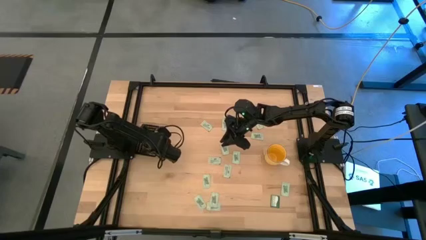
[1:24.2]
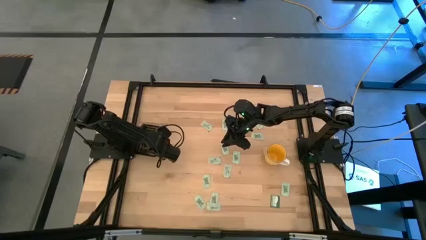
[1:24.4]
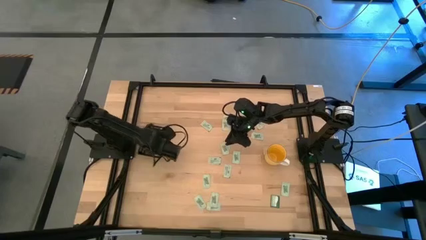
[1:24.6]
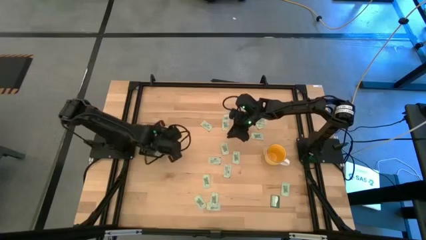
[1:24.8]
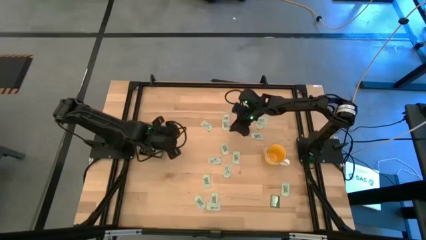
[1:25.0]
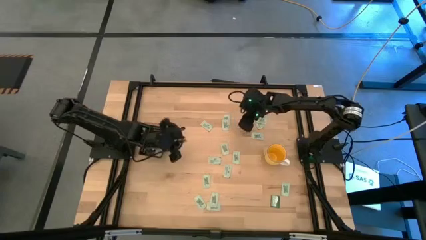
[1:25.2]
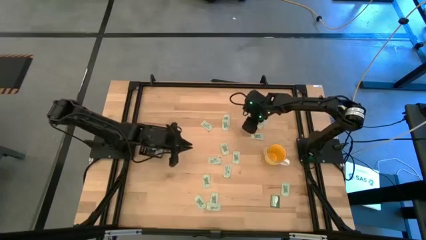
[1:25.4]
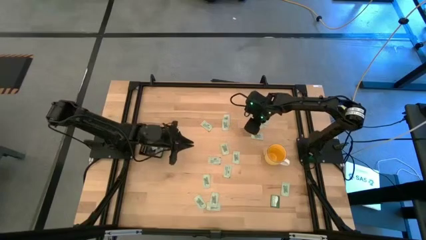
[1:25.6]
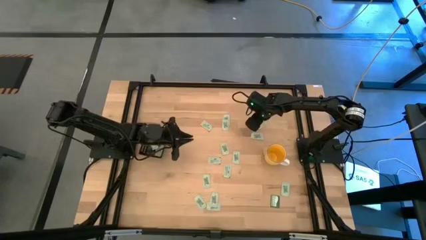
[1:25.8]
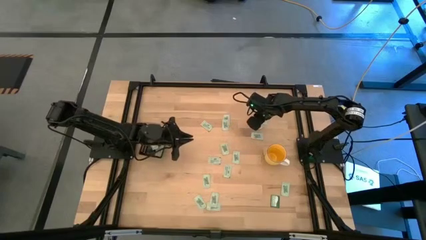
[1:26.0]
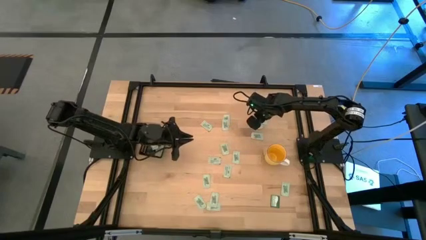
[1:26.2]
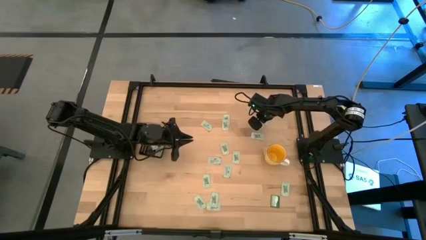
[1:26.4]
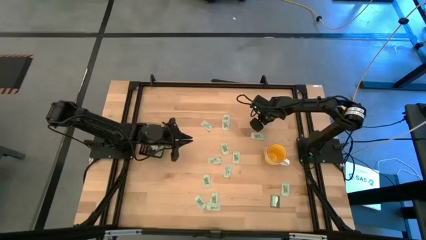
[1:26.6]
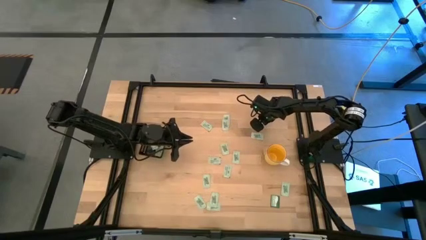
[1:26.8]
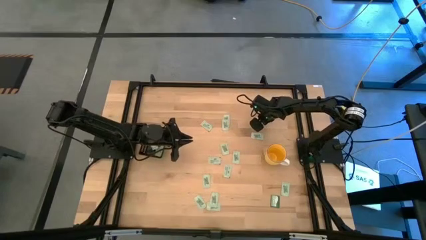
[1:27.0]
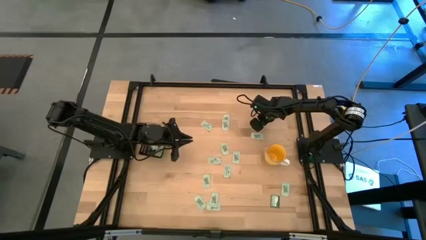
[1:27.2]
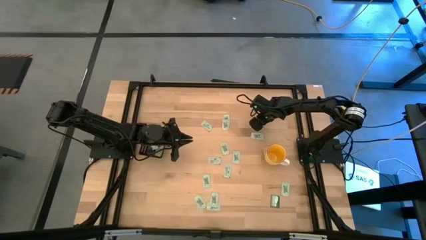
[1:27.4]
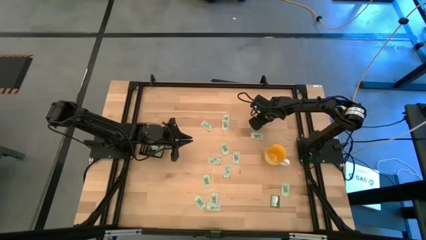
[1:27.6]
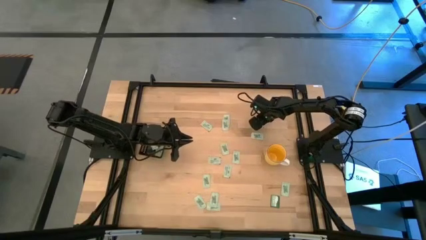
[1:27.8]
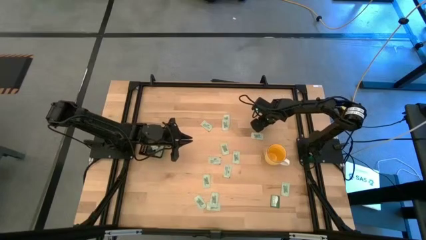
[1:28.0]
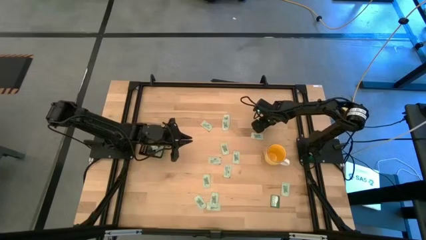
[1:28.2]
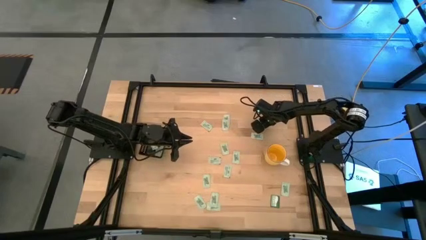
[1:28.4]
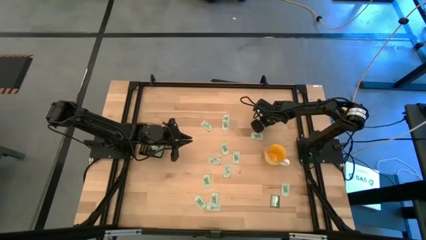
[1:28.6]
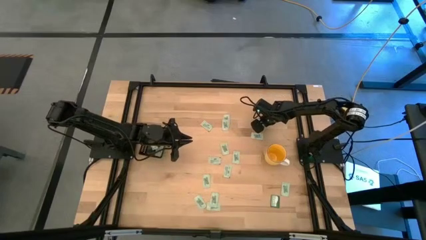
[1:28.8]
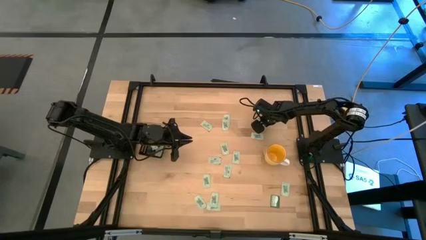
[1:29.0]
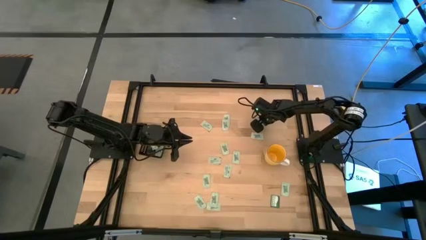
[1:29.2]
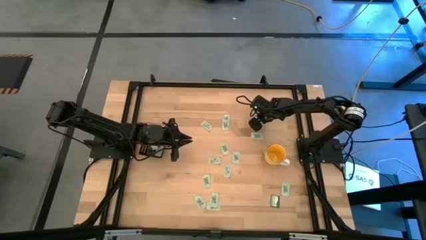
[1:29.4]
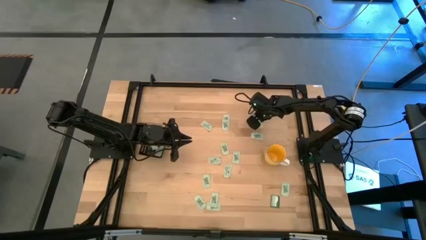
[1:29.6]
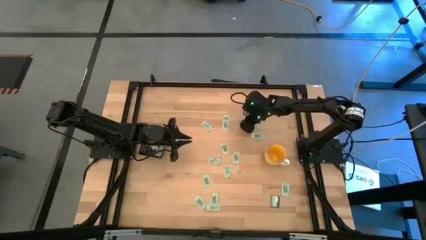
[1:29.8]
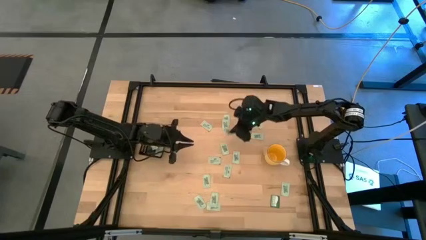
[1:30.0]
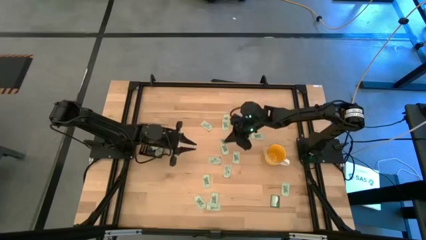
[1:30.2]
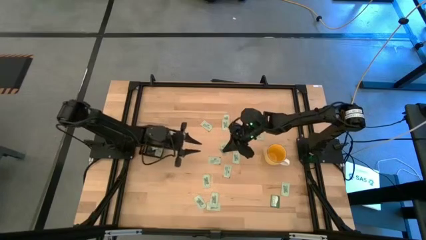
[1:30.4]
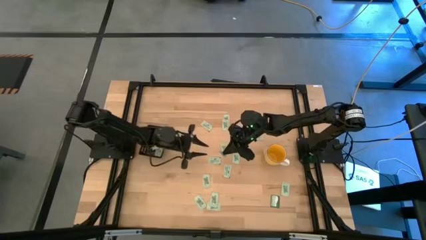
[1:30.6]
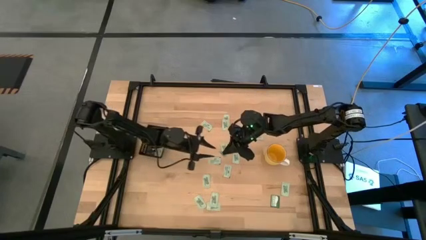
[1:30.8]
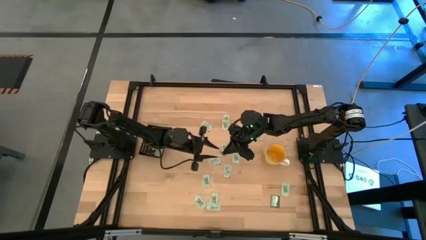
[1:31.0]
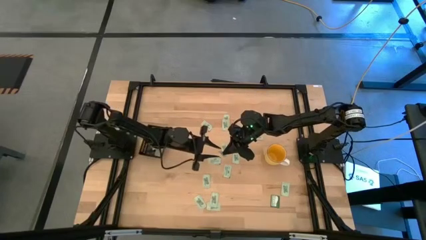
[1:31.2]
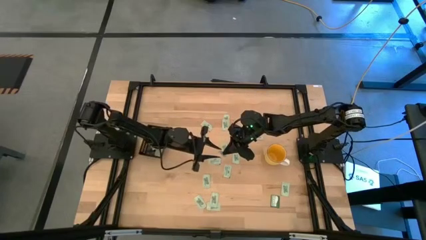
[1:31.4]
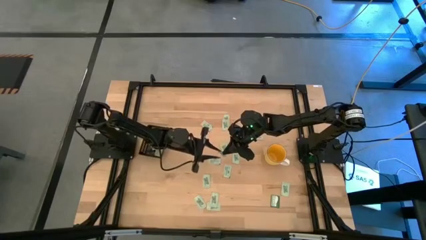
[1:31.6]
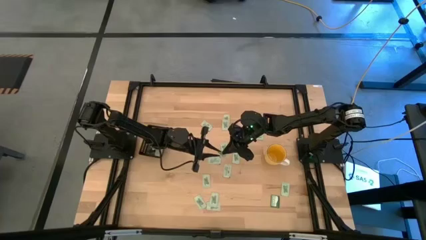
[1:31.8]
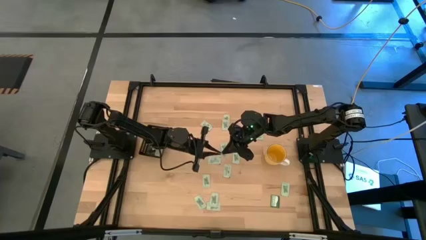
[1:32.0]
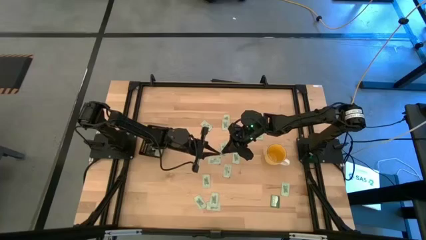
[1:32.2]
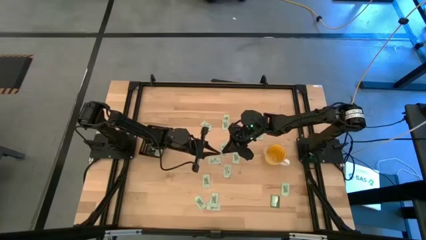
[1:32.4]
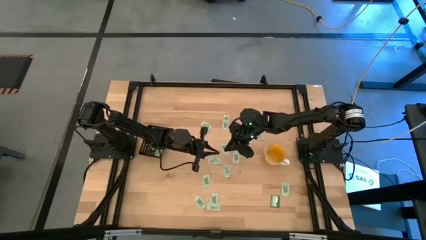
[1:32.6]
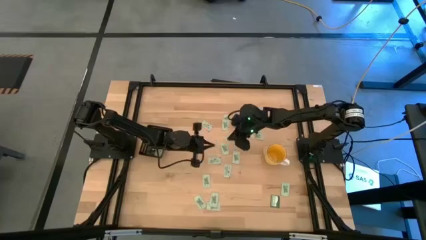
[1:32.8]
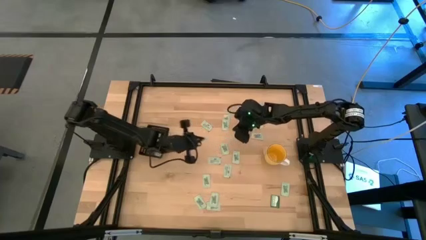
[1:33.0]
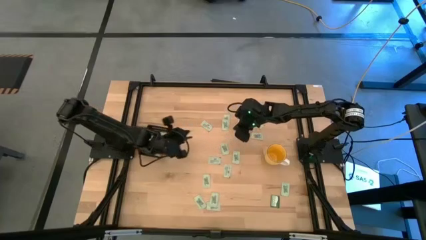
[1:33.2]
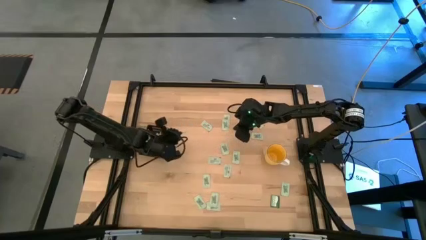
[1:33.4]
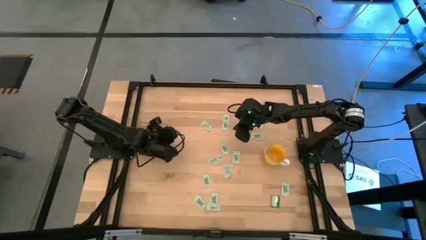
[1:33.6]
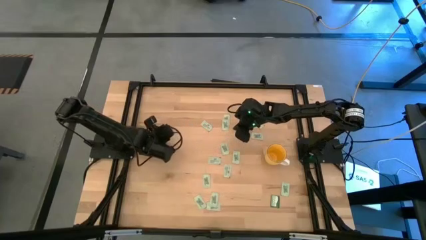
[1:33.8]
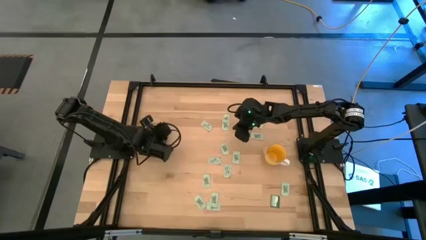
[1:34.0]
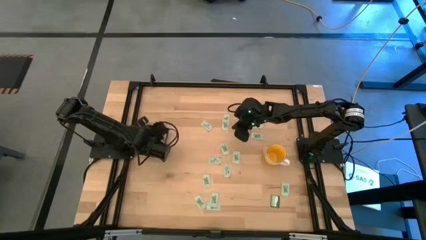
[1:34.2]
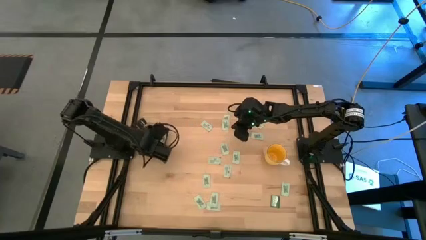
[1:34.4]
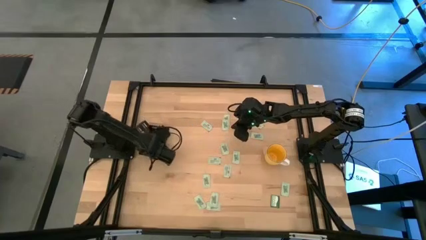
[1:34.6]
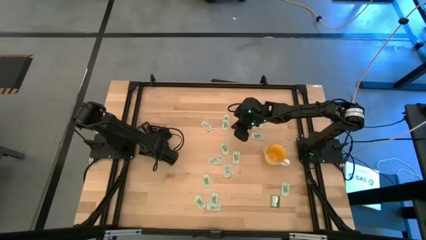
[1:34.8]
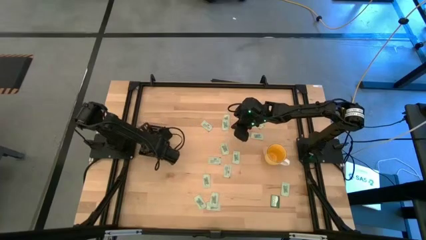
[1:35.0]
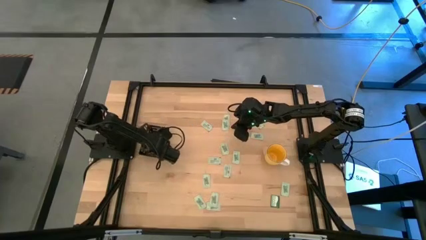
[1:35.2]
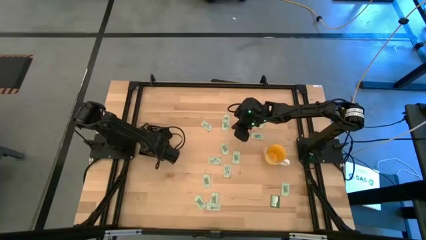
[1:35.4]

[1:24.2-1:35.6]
Task: Pick and place Stevia / Truvia into bins
Put the stevia packet into the black bin
